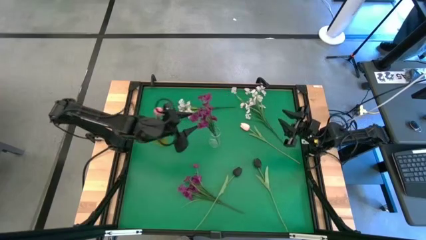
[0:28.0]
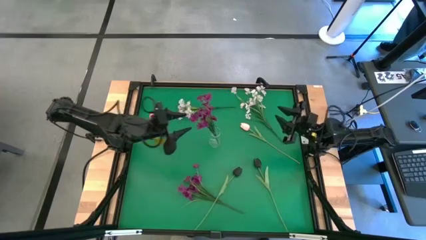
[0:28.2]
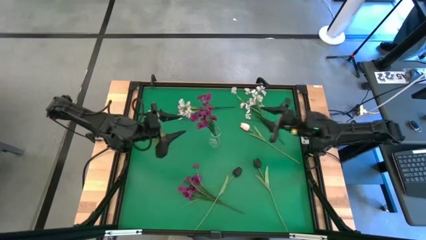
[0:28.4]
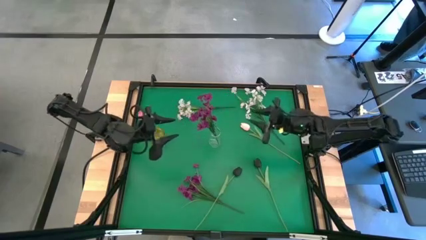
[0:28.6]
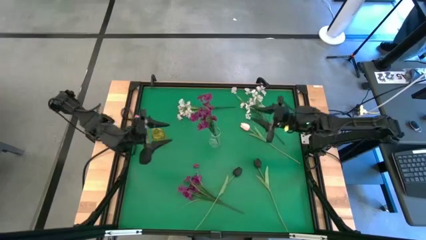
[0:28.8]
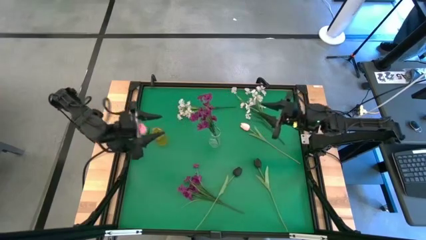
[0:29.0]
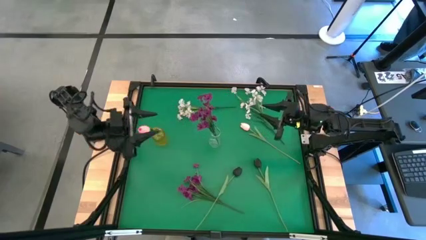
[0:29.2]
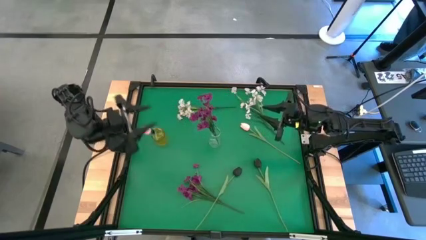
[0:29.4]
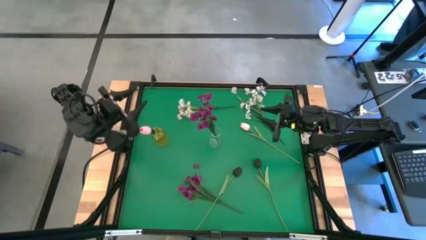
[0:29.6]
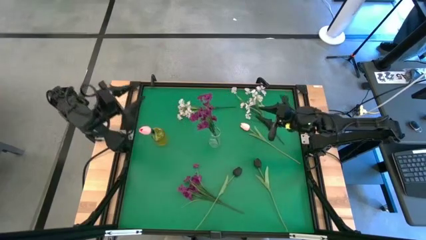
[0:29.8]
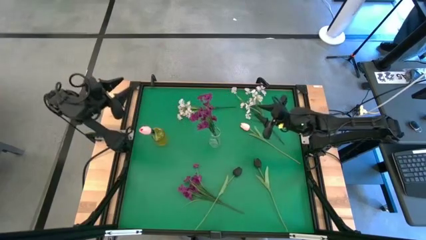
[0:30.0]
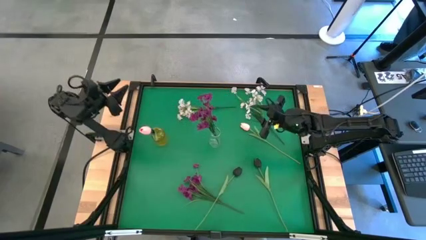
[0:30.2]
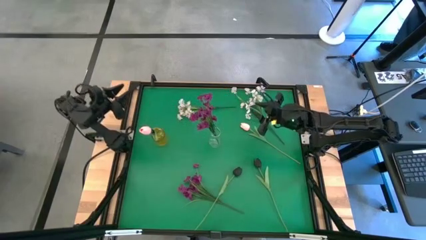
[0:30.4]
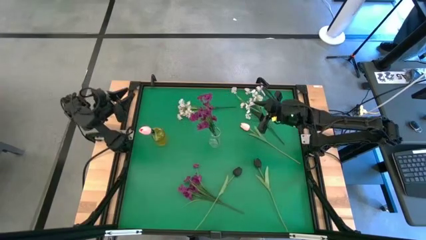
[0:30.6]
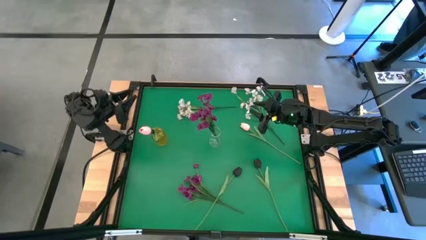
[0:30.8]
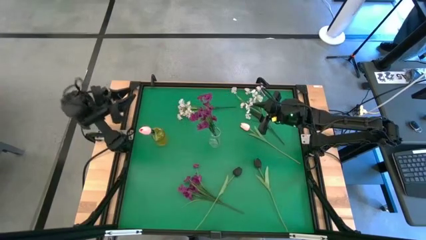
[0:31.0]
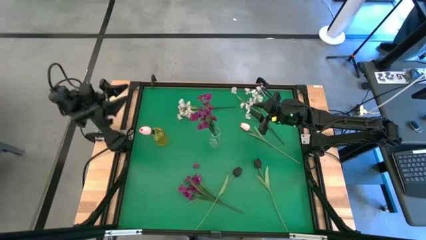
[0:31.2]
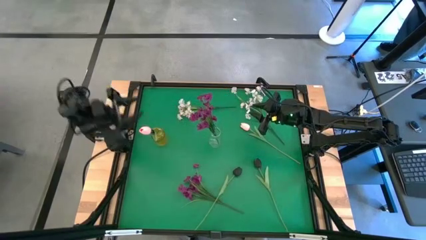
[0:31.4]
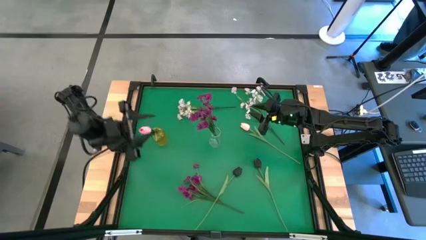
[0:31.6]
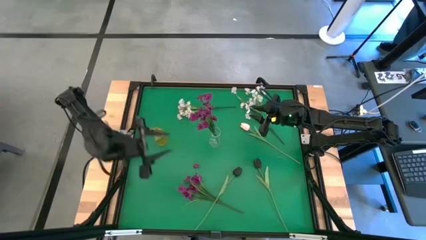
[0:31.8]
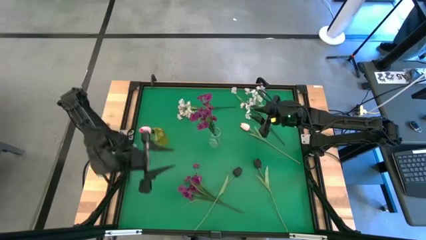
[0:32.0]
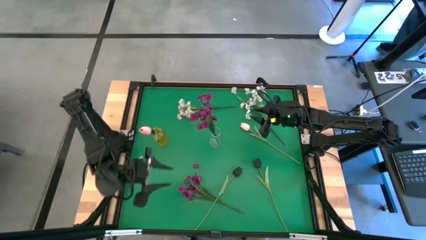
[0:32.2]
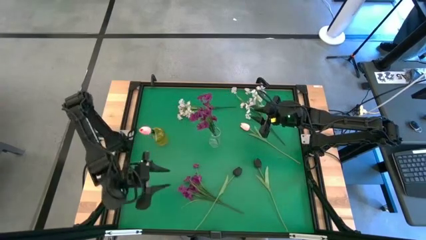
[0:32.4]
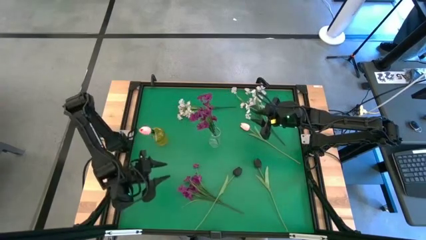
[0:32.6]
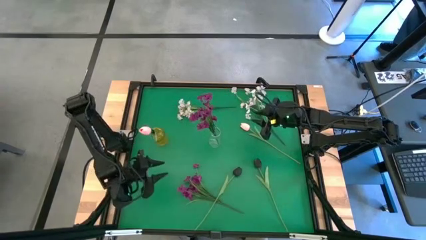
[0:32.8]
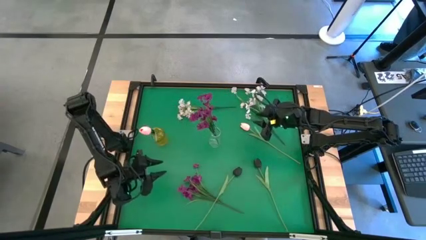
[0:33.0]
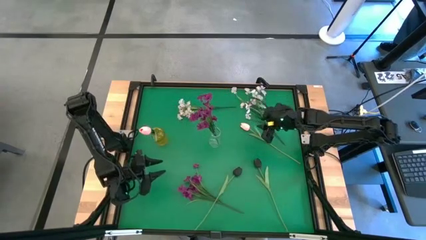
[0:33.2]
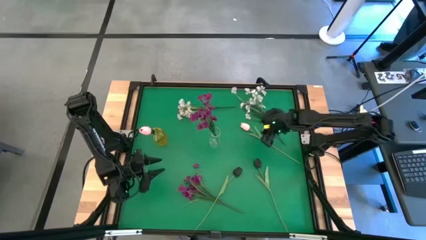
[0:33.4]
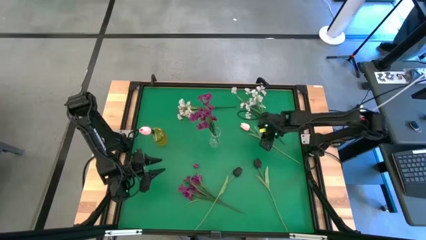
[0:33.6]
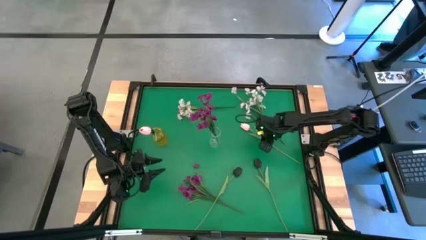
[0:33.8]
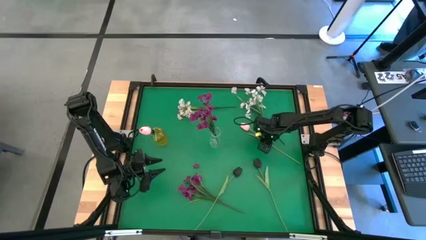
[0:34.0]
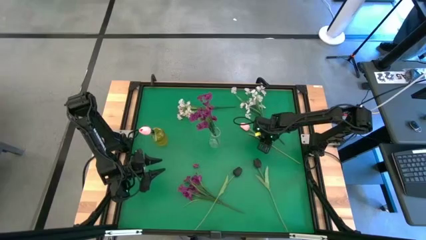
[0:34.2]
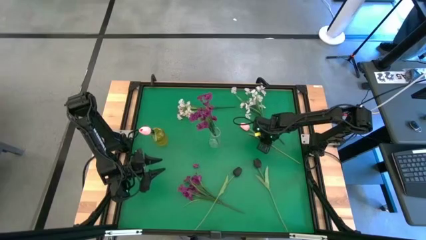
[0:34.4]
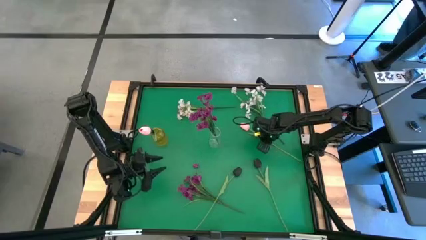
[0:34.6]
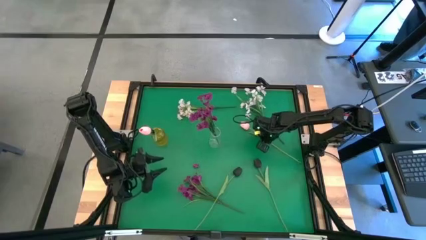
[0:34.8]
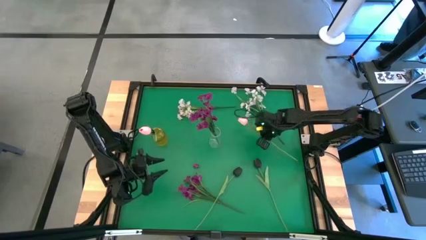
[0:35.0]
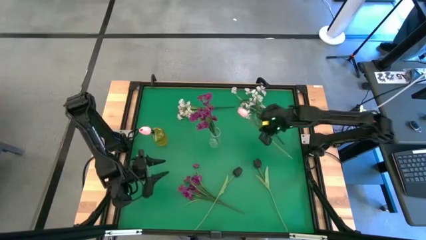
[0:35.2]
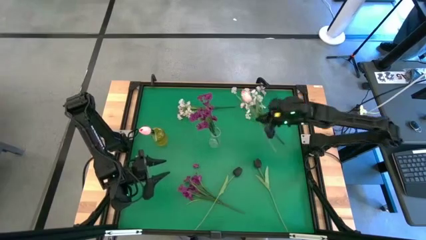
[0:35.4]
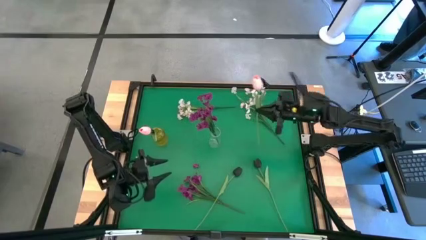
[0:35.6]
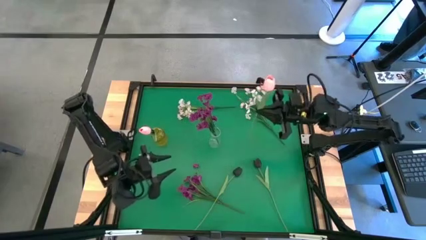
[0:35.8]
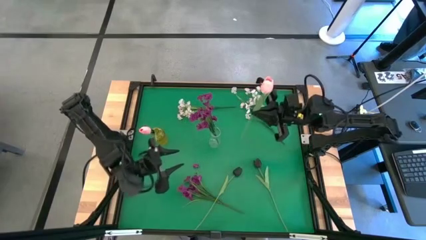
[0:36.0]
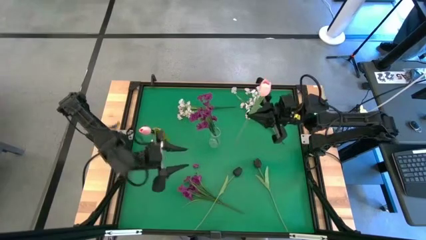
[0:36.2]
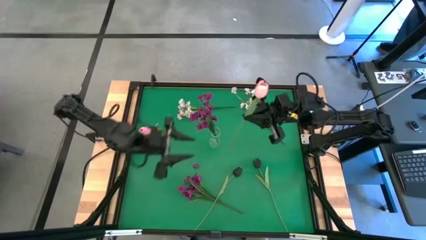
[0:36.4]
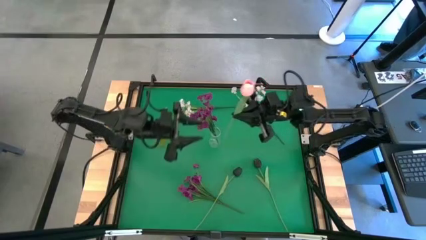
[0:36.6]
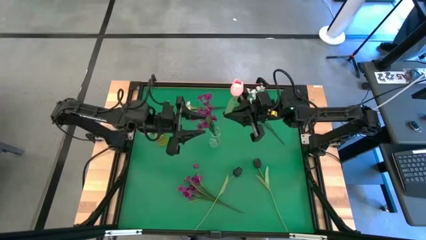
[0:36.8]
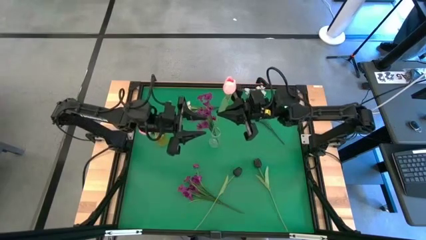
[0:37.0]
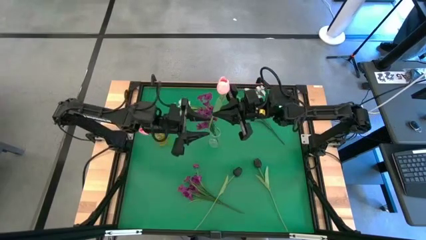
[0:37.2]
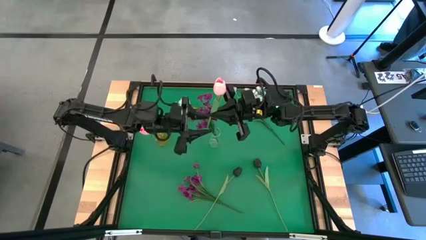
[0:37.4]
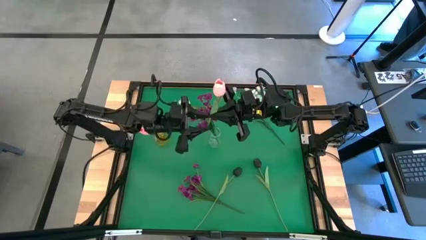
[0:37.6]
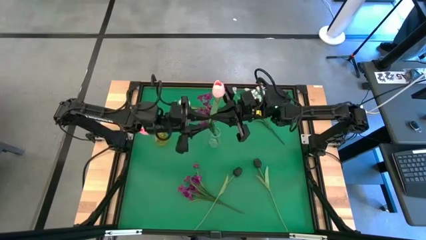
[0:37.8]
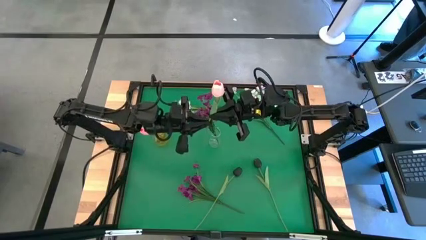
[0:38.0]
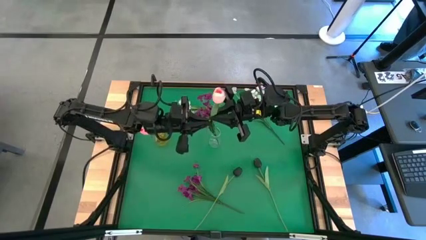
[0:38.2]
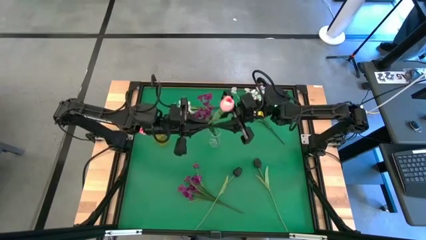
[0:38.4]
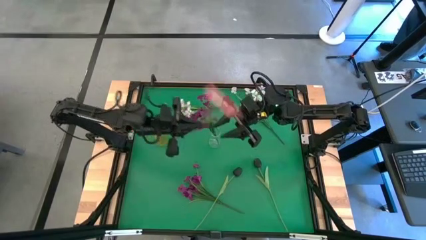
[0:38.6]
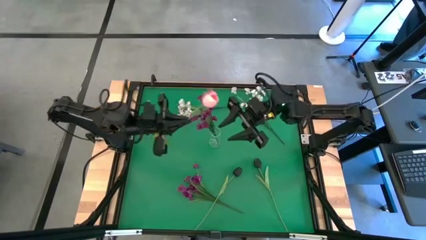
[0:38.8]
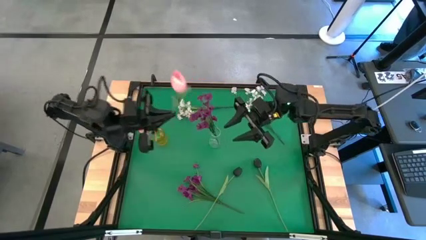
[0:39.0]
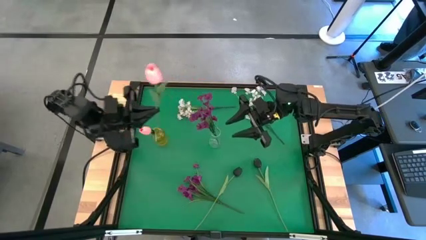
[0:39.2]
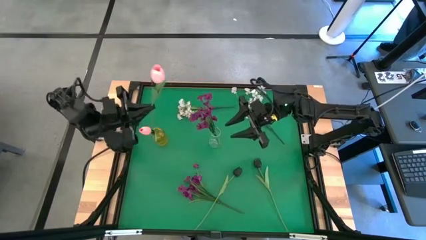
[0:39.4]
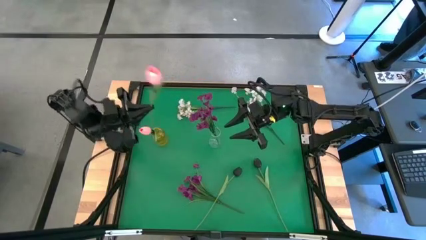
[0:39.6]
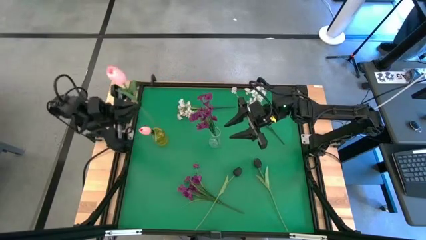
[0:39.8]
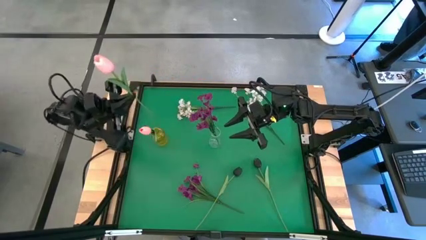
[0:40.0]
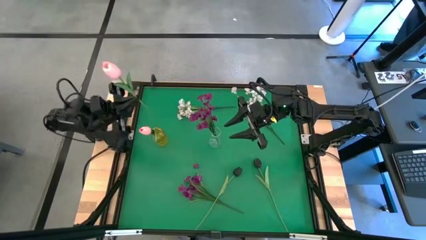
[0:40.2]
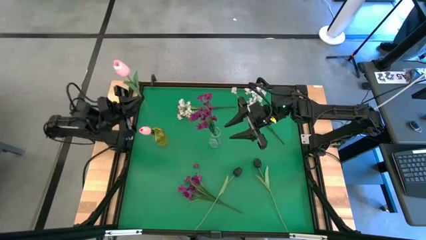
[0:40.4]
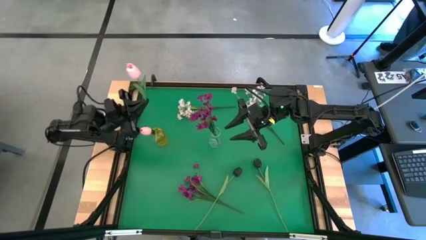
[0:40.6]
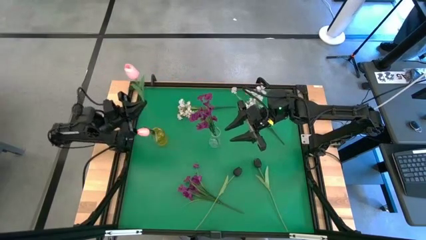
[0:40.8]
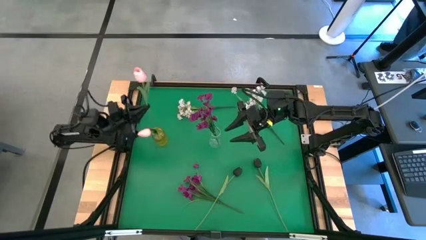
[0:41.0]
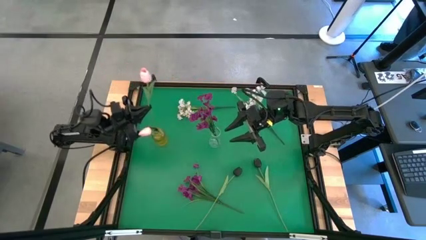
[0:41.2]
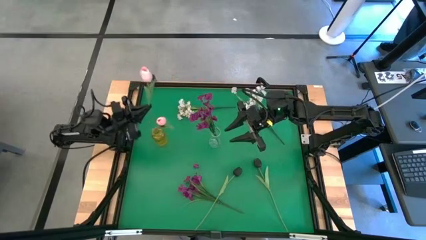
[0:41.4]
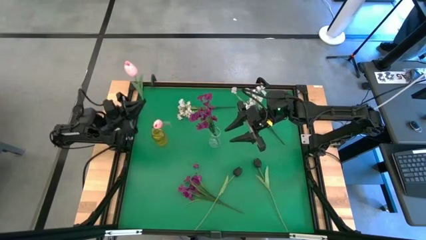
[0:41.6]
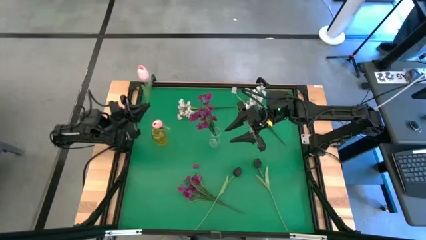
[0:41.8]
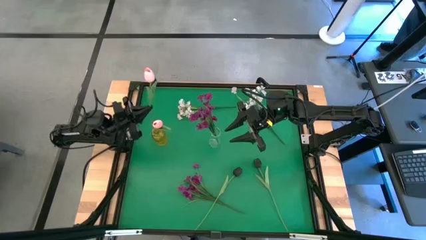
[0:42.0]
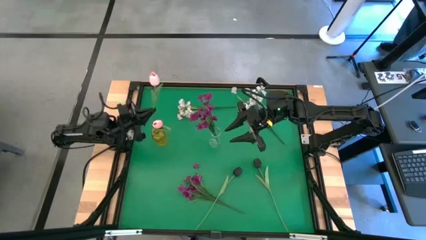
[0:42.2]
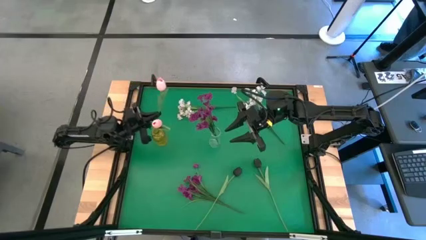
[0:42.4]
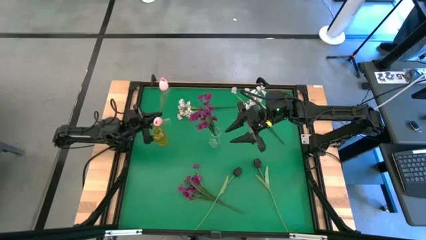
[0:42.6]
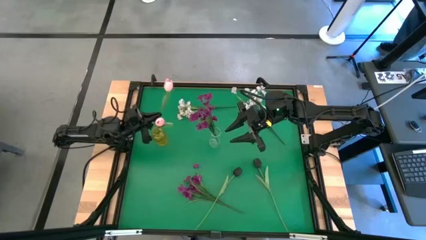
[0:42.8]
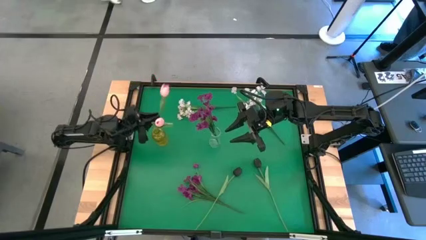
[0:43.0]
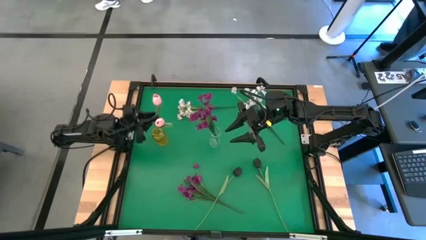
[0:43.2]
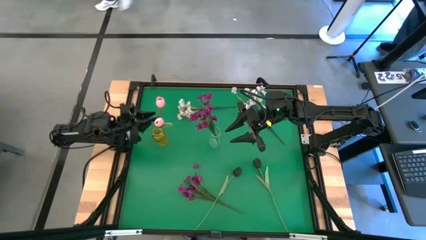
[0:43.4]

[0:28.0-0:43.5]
Task: Sort flowers into vase by color
Put the pink flower into the yellow vase

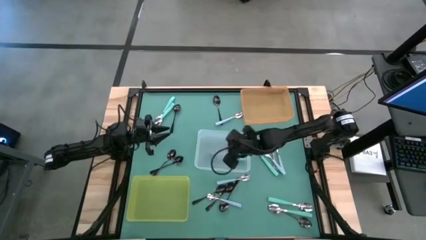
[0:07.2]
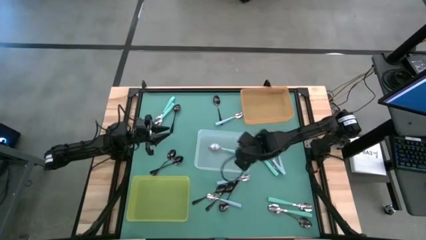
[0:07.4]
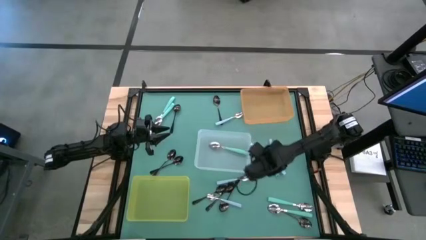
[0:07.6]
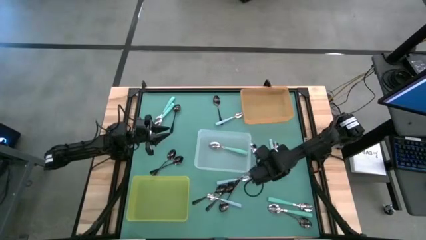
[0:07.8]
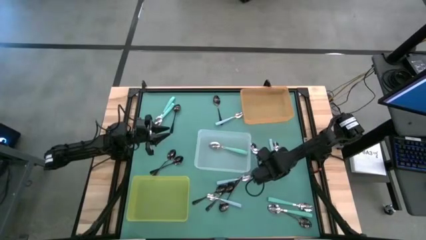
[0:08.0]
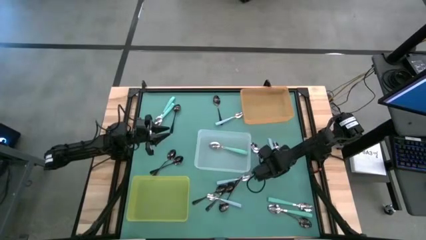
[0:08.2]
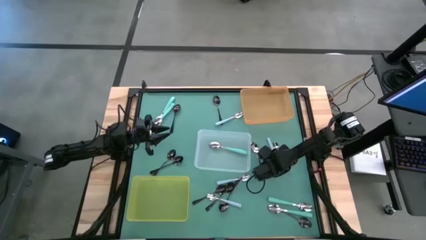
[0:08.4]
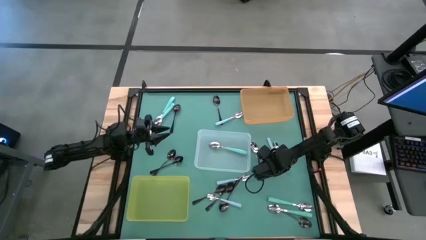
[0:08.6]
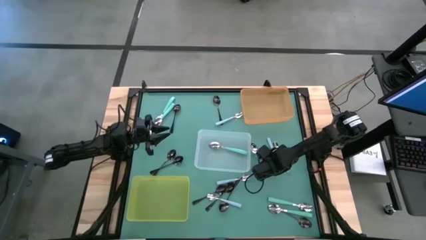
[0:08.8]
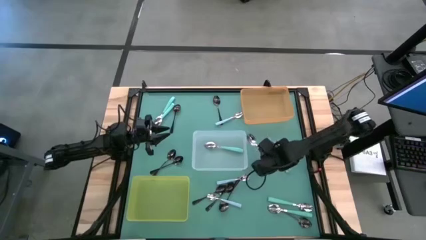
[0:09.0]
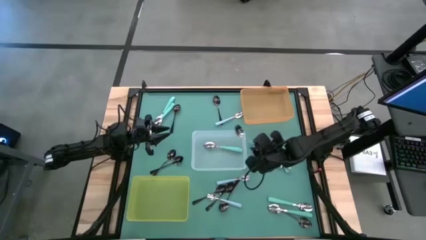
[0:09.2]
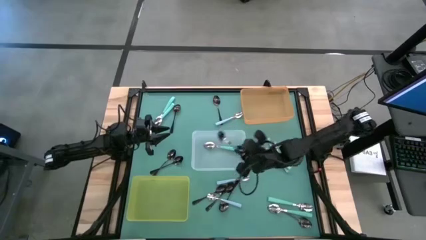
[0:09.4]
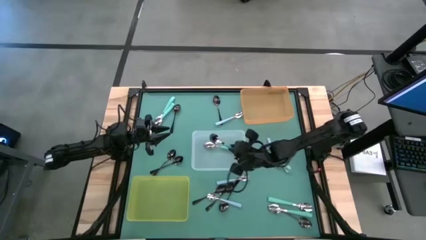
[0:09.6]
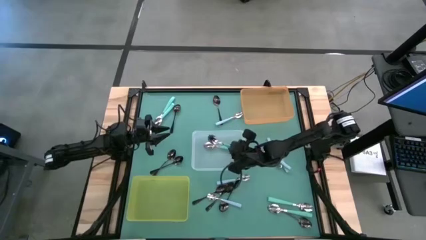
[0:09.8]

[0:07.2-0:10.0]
Task: Sort silverware by color (type)
Put the green spoon into the transparent bin
